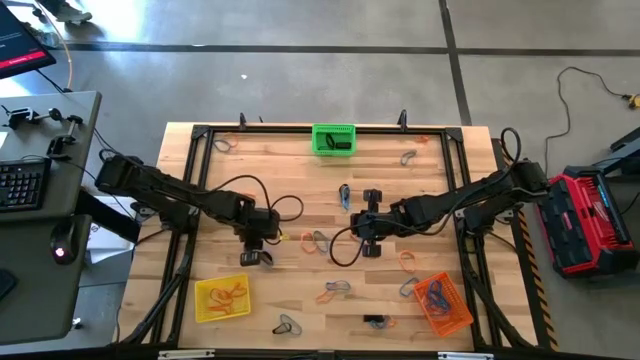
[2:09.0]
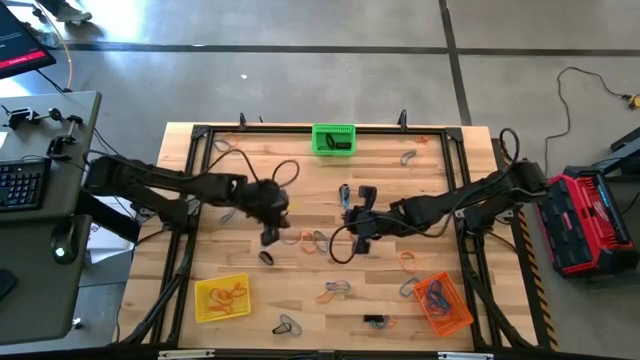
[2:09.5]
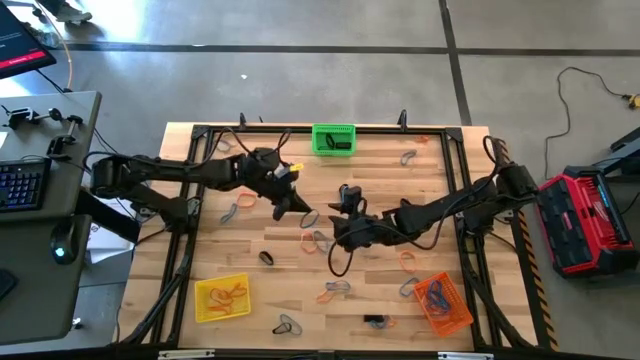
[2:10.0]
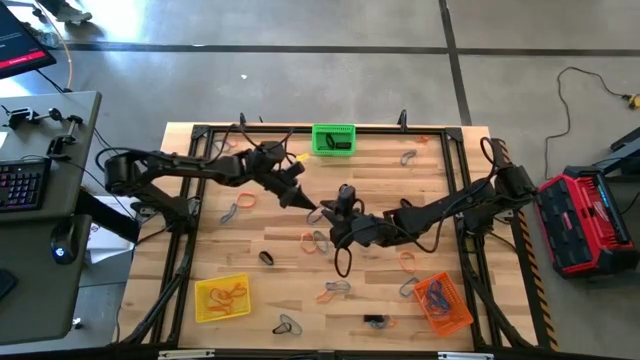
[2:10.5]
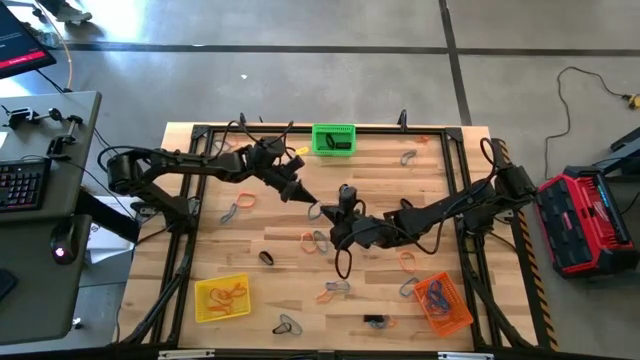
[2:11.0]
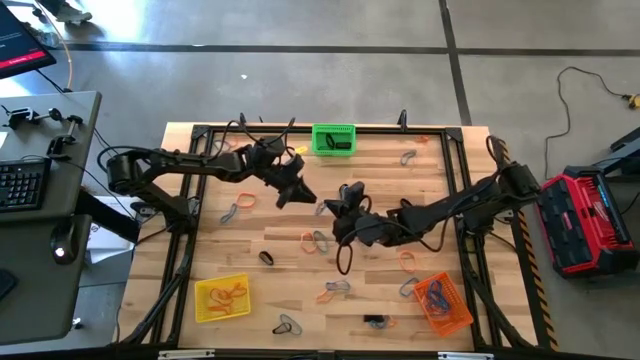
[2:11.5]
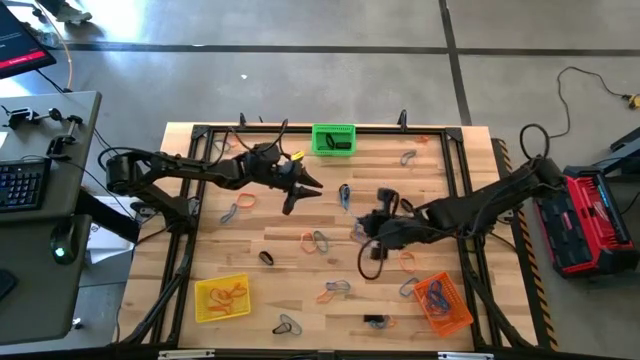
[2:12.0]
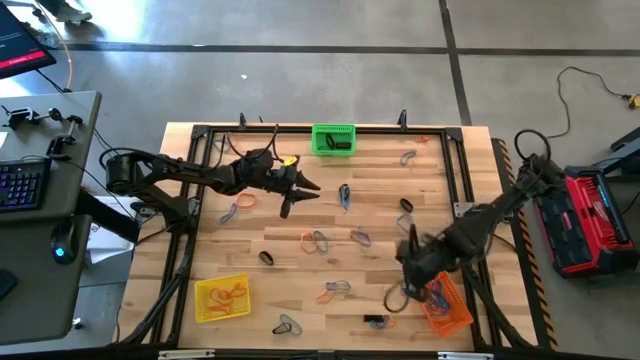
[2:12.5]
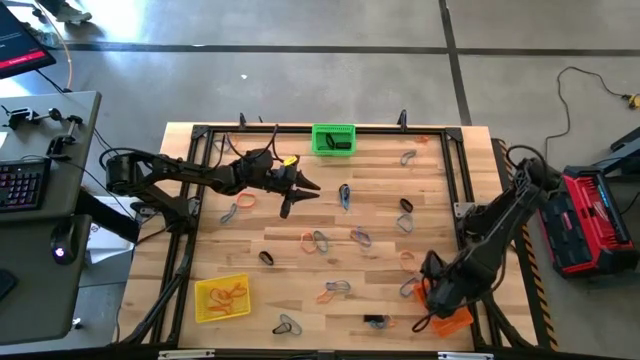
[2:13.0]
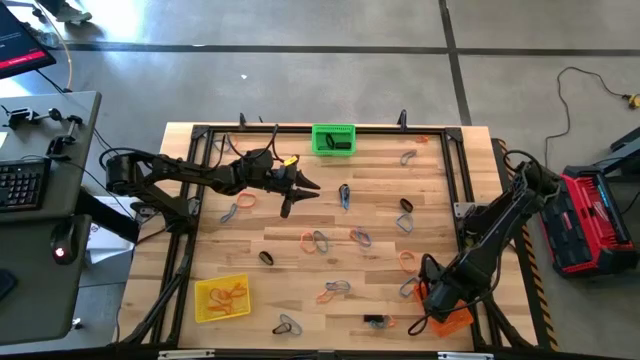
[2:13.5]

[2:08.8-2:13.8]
Task: Sort rubber bands into baskets
Put the blue rubber band into the orange bin

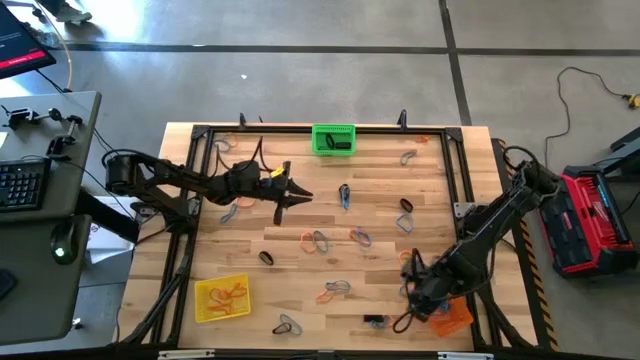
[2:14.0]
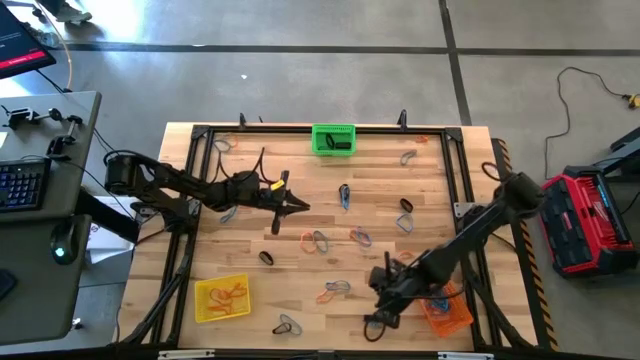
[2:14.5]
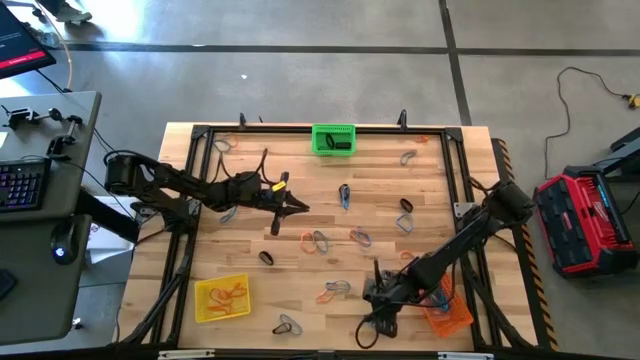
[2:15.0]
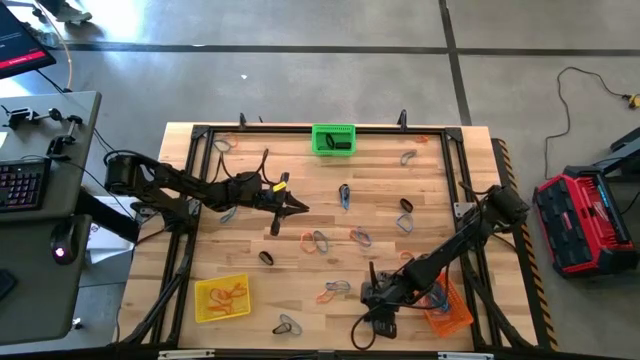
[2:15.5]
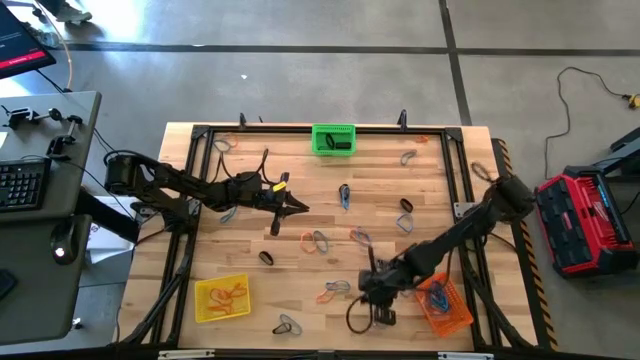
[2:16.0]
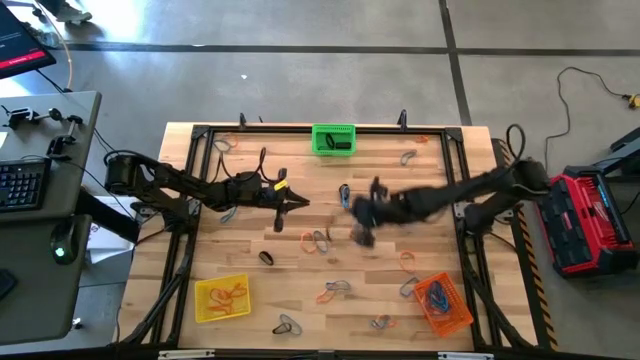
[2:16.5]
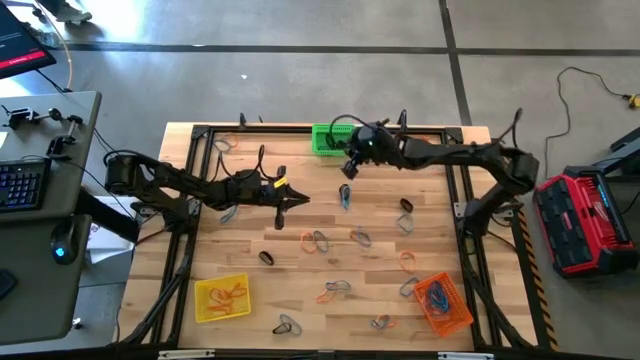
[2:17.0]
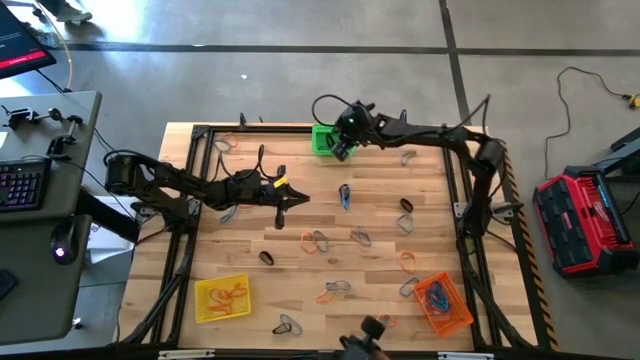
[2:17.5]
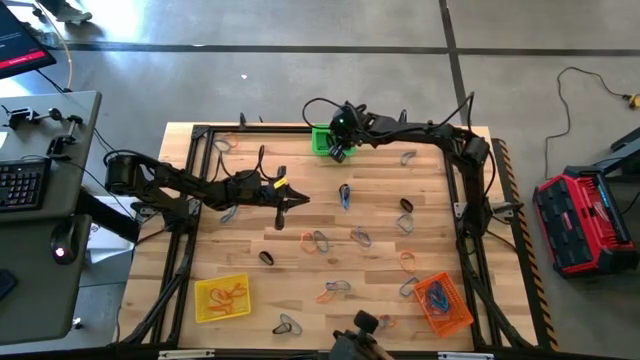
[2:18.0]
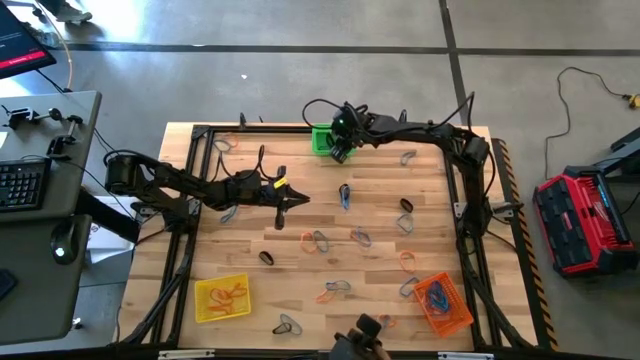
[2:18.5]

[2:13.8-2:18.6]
Put the black rubber band into the green bin

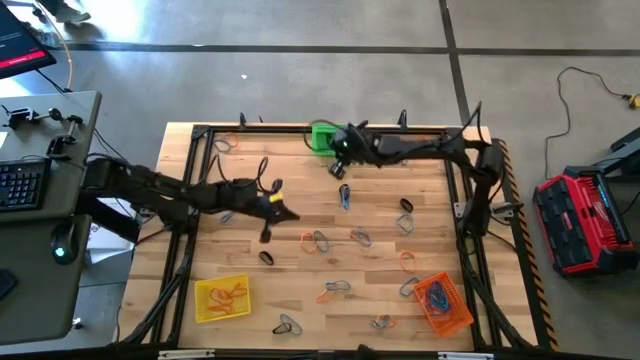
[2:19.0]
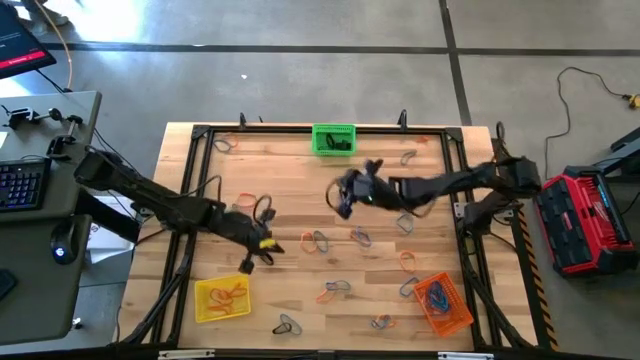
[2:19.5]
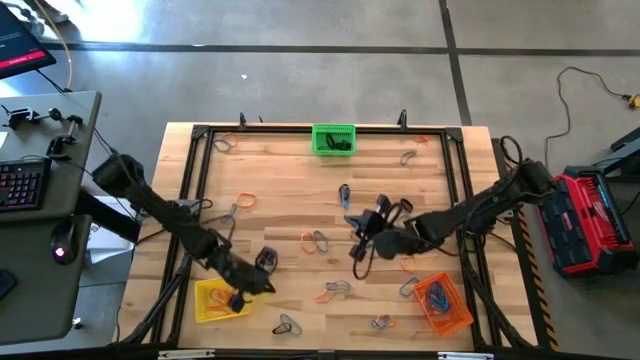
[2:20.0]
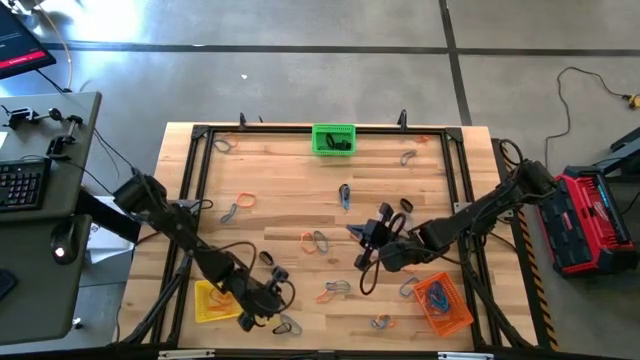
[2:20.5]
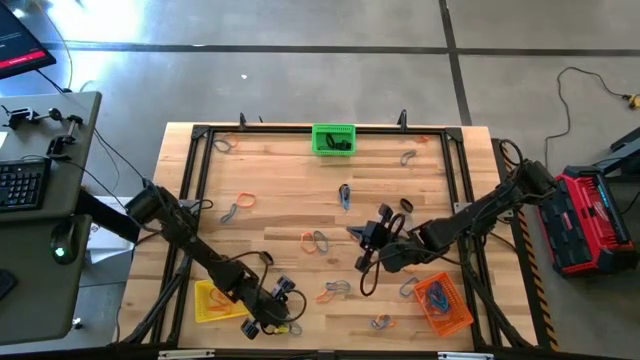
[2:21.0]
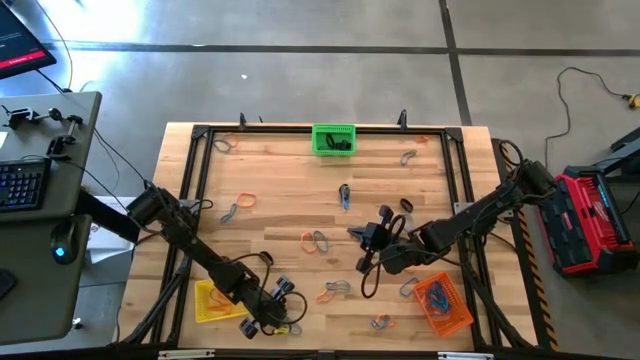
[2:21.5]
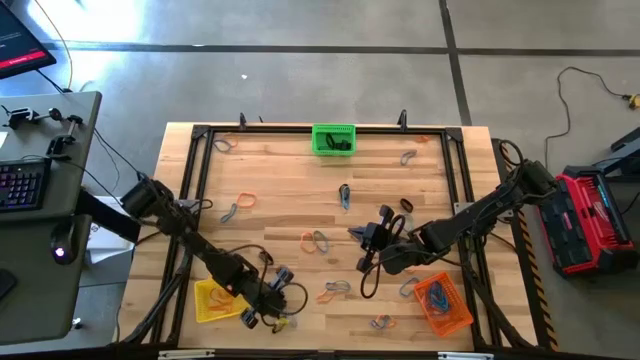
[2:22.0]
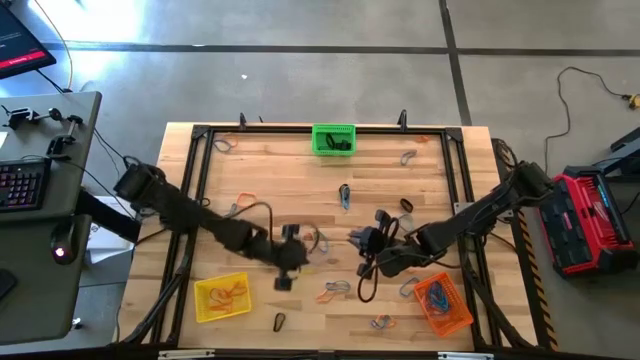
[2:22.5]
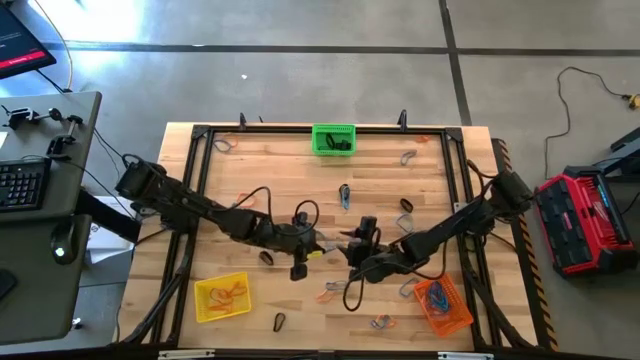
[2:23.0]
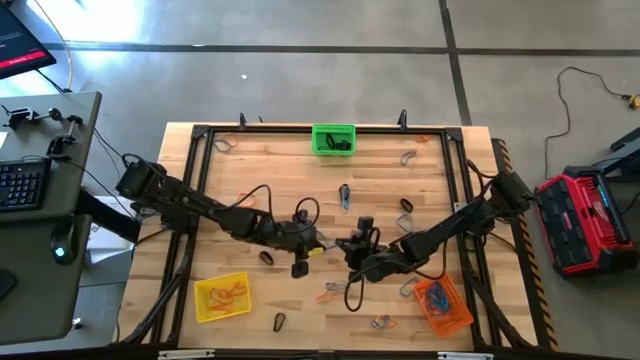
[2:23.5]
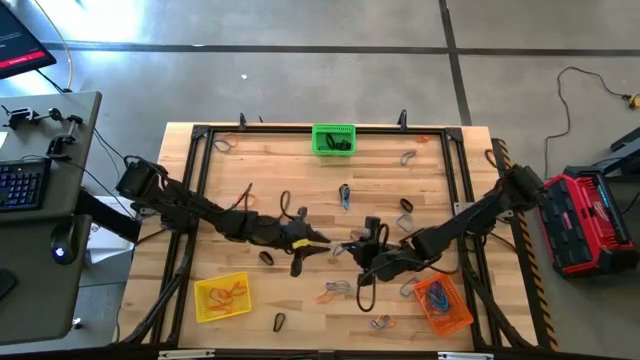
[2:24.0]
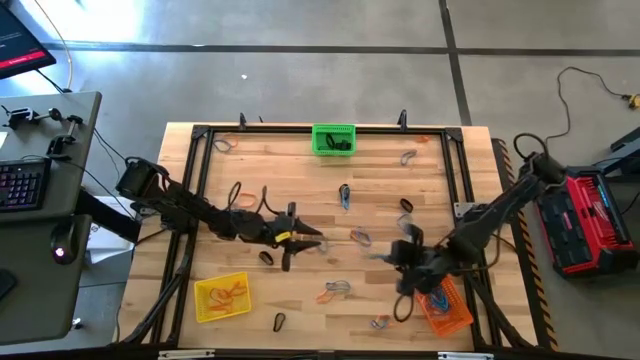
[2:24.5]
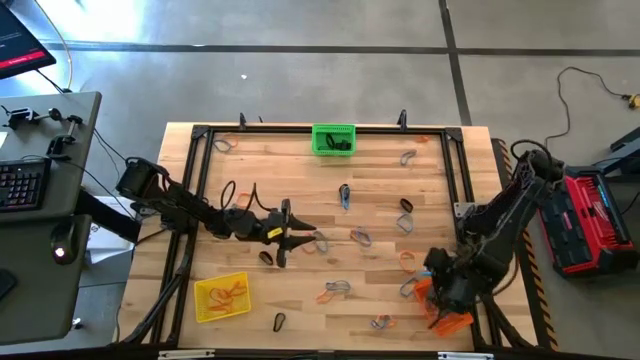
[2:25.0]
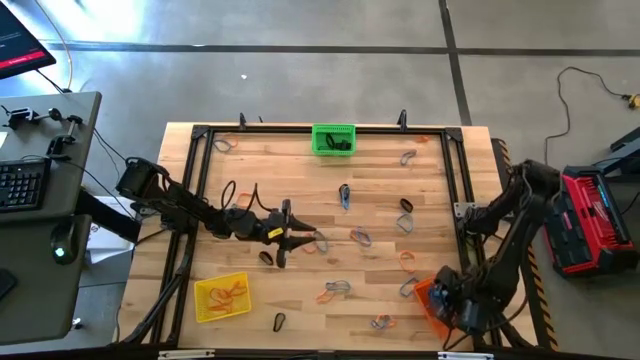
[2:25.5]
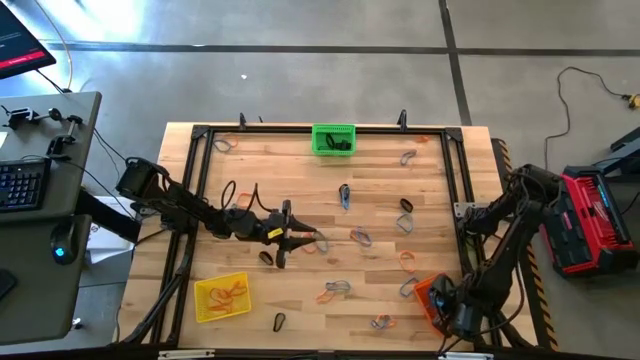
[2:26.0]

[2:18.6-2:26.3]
Put the blue rubber band into the orange bin

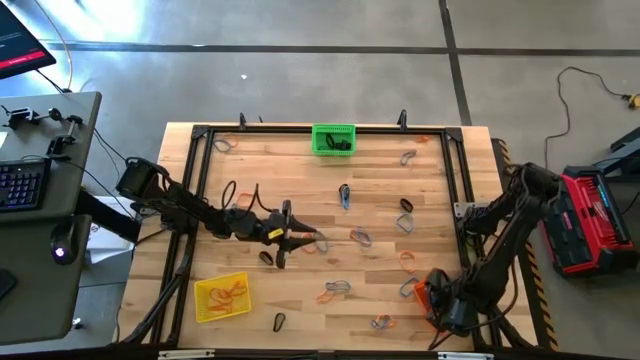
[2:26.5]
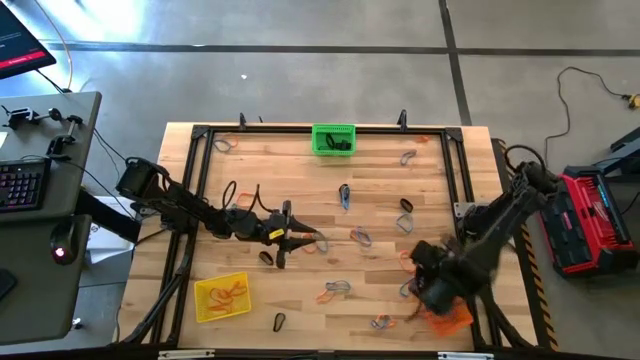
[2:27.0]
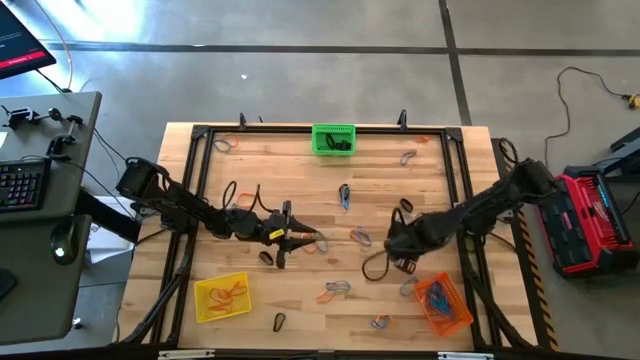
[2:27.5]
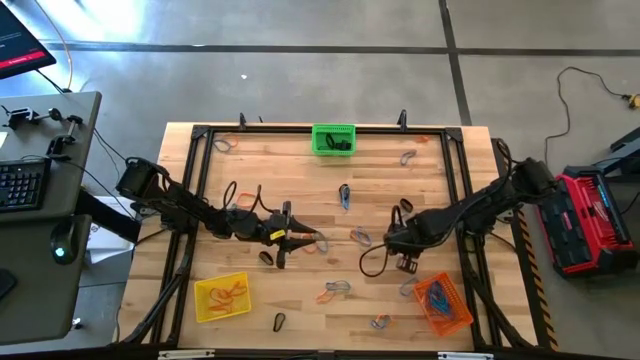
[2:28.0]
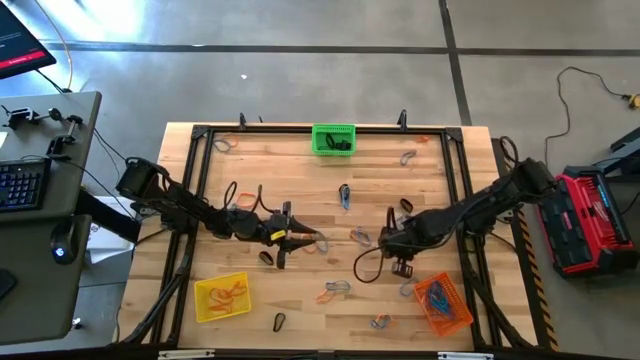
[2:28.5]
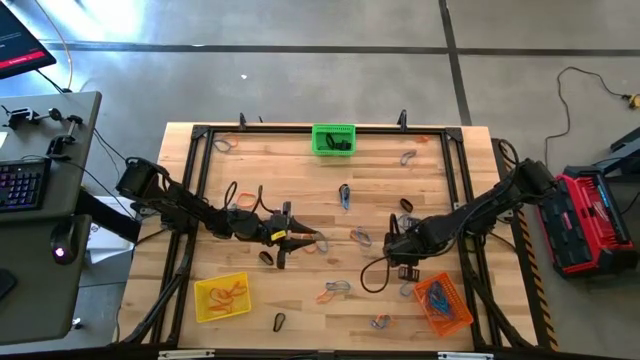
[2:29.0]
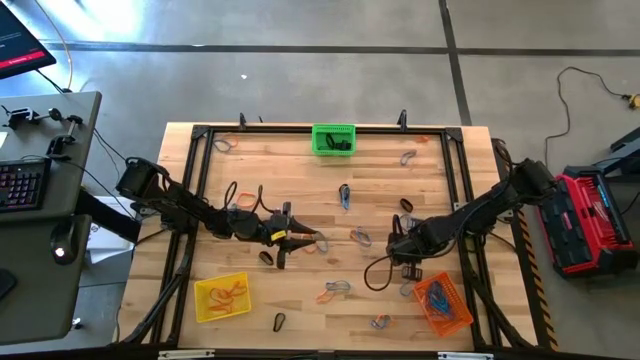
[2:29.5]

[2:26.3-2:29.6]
Put the orange rubber band into the yellow bin
